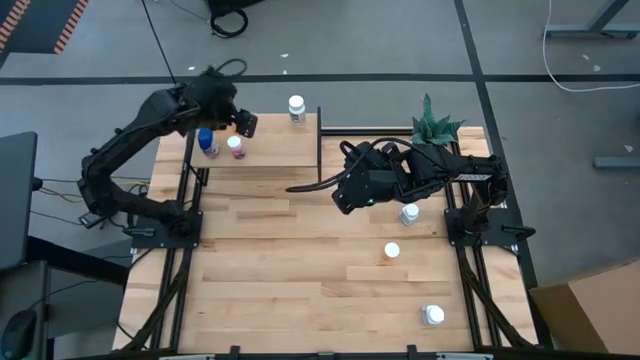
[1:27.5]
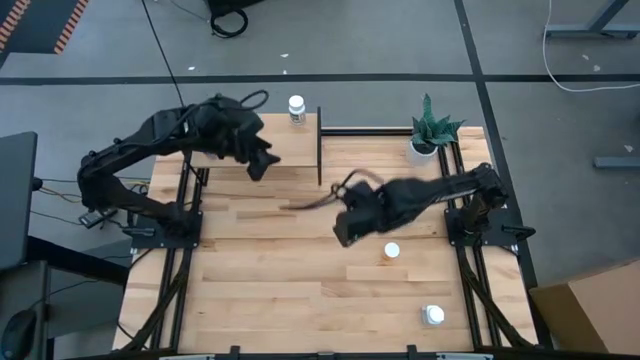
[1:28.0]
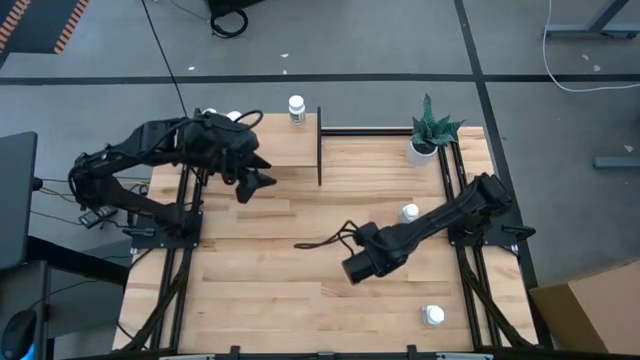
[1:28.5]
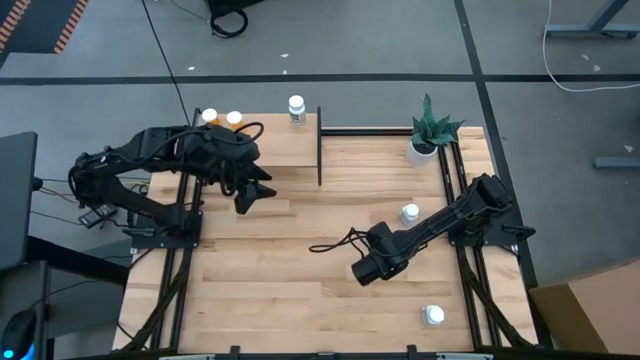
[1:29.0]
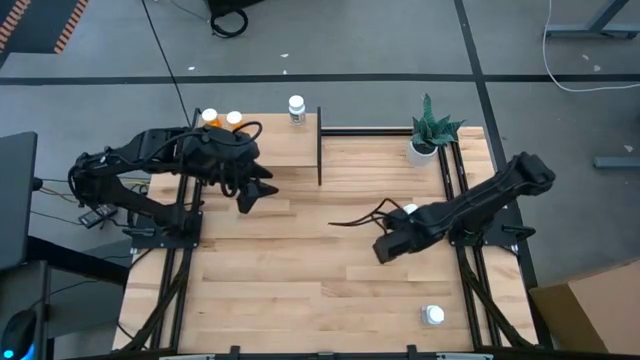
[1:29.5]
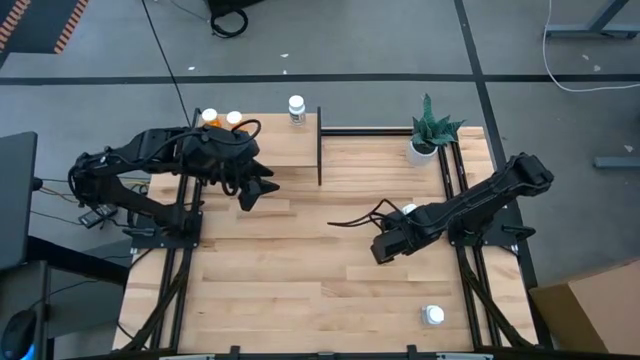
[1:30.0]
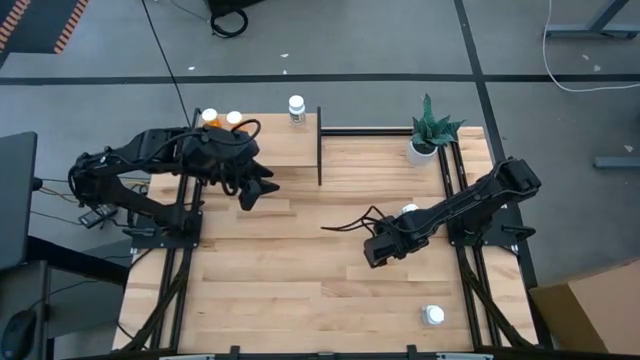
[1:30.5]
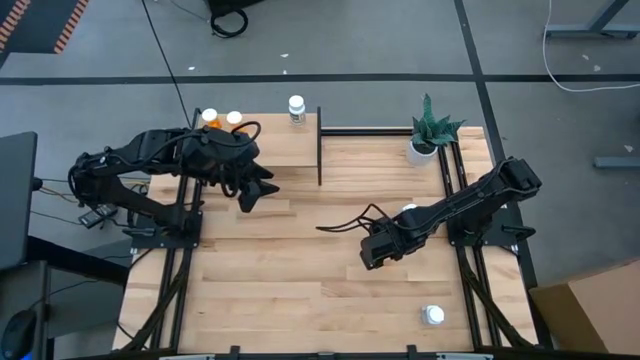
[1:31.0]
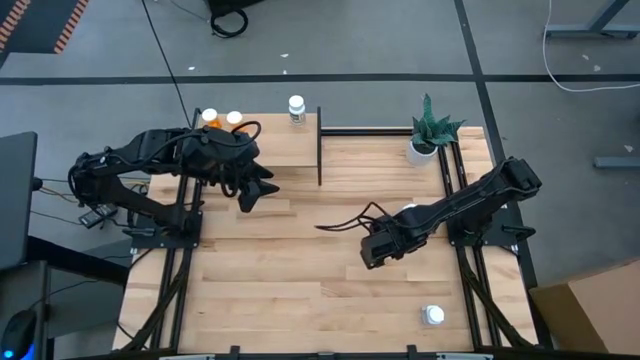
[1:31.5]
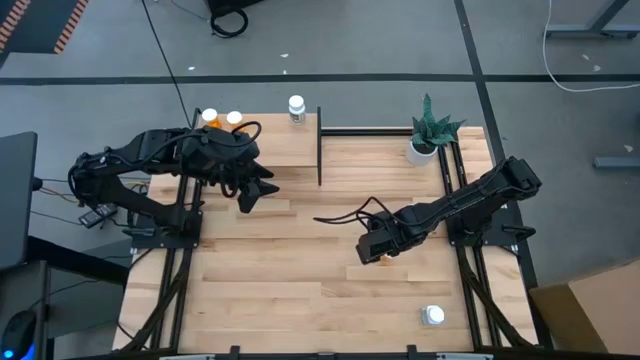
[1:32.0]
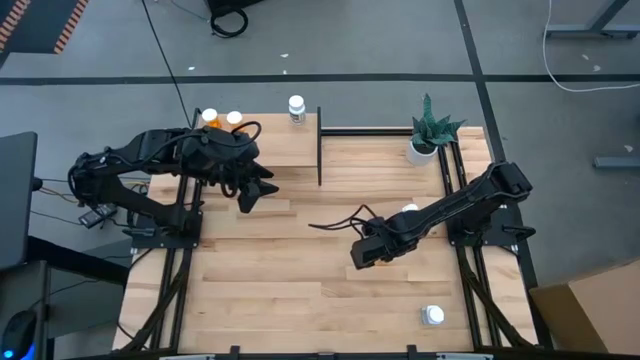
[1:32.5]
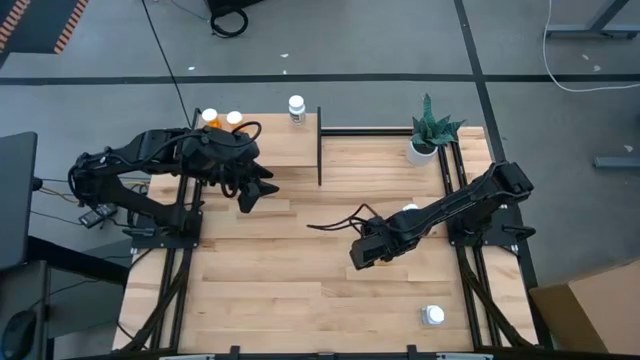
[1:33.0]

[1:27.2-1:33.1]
Task: Pick and place medicine bottles onto shelf by color
Put the orange pill bottle on the shelf

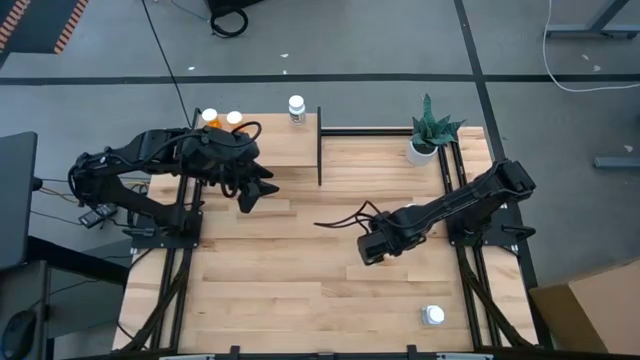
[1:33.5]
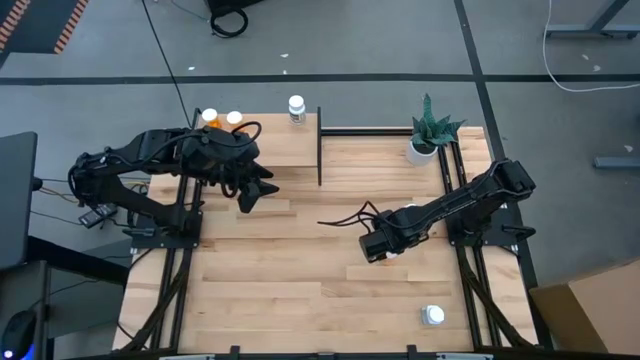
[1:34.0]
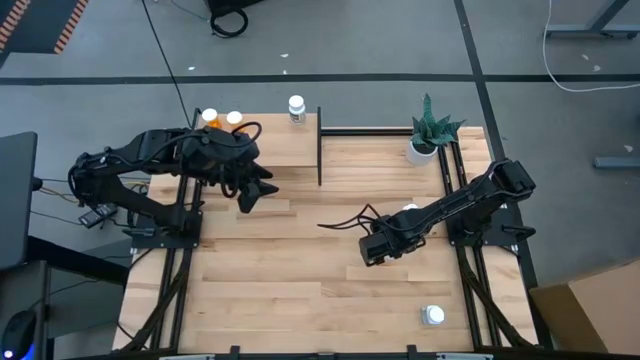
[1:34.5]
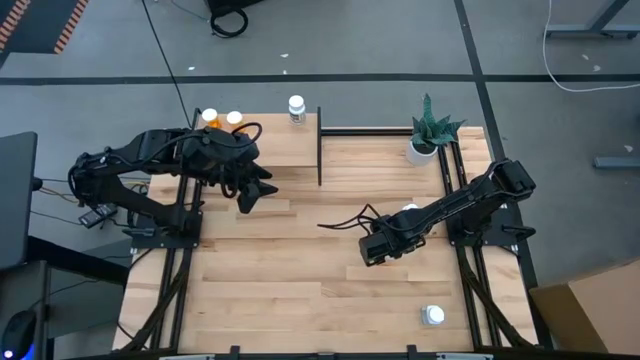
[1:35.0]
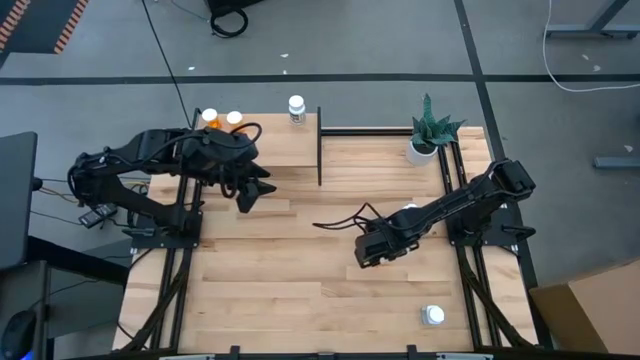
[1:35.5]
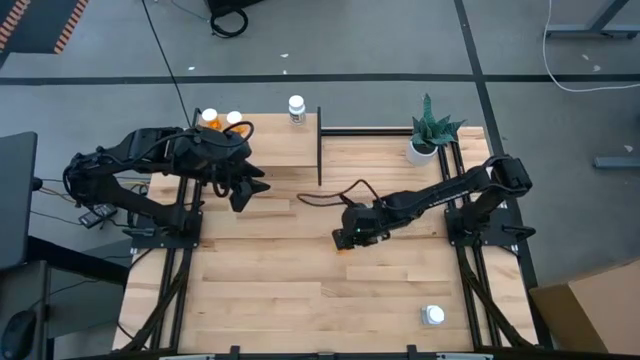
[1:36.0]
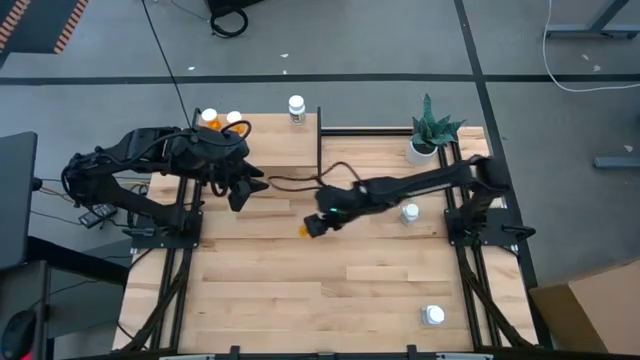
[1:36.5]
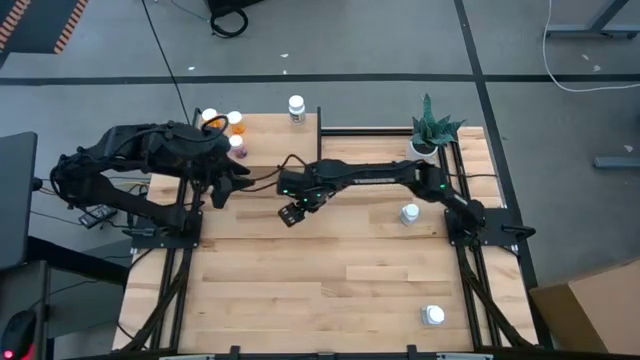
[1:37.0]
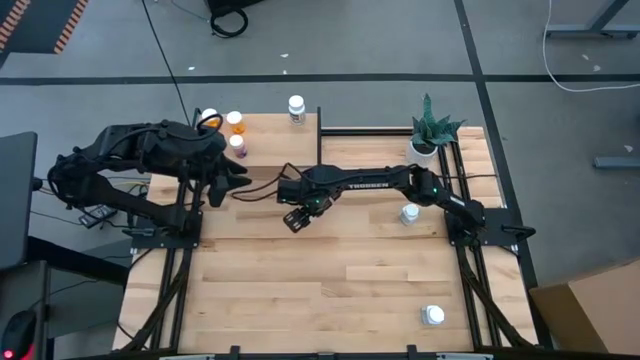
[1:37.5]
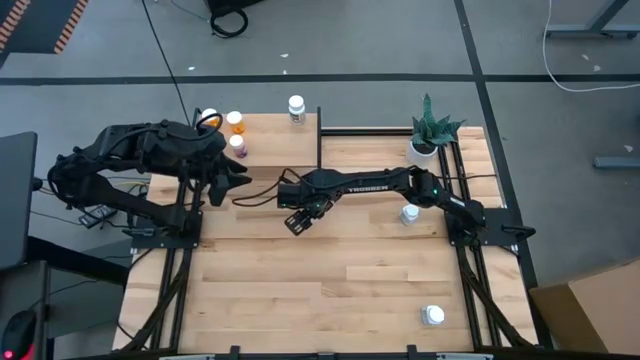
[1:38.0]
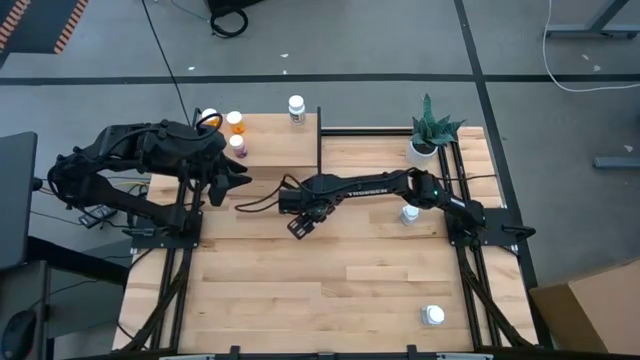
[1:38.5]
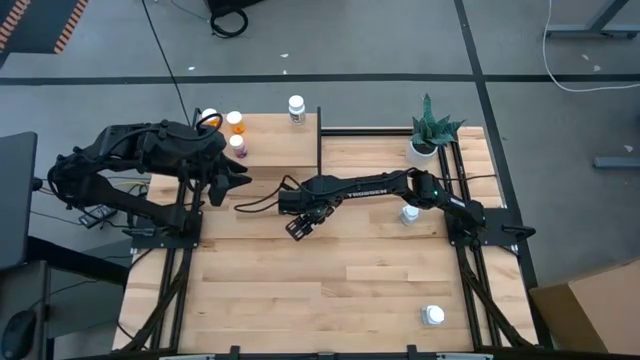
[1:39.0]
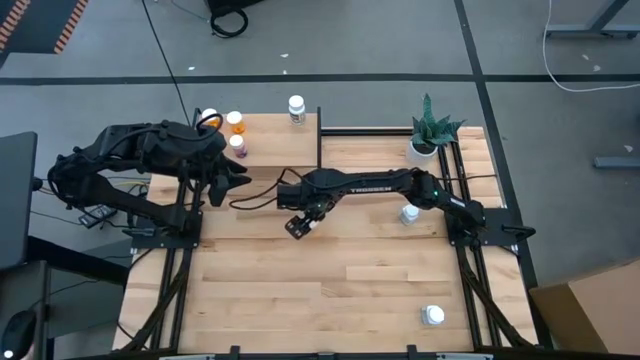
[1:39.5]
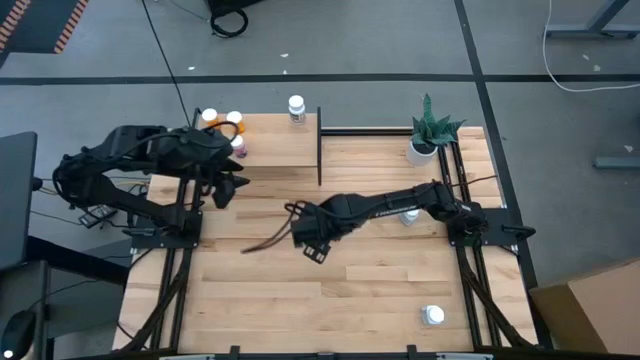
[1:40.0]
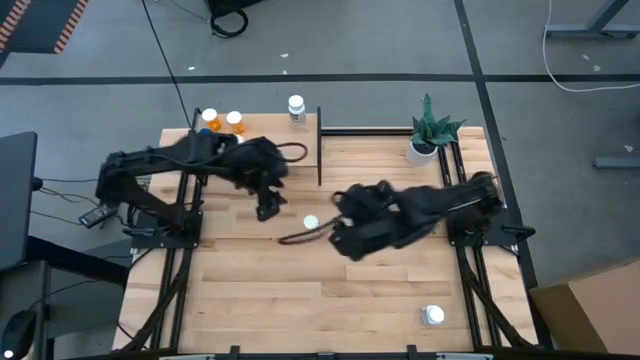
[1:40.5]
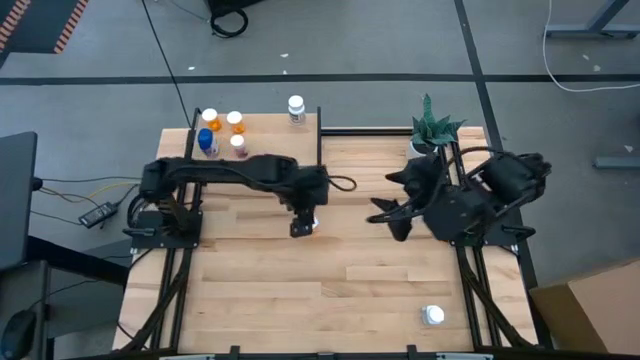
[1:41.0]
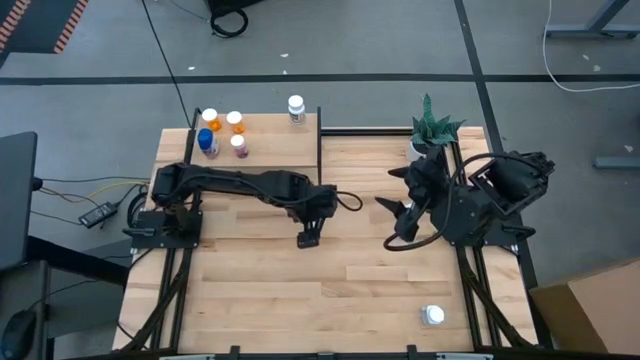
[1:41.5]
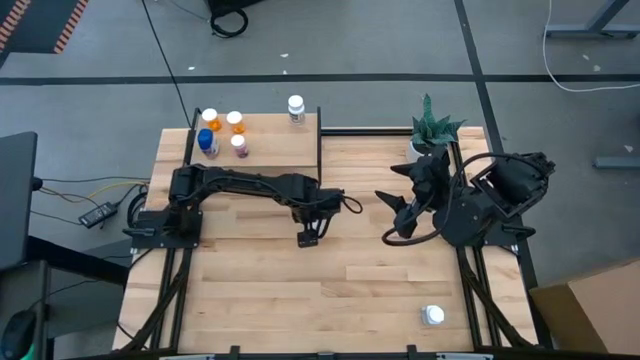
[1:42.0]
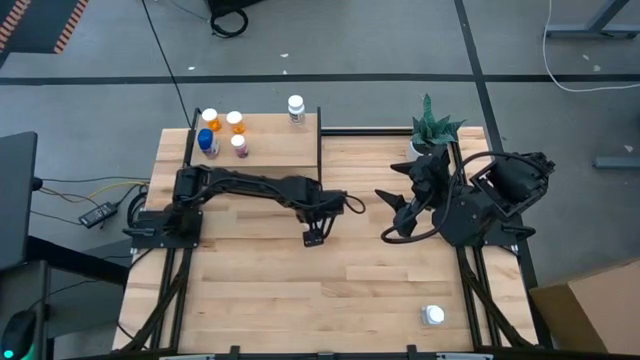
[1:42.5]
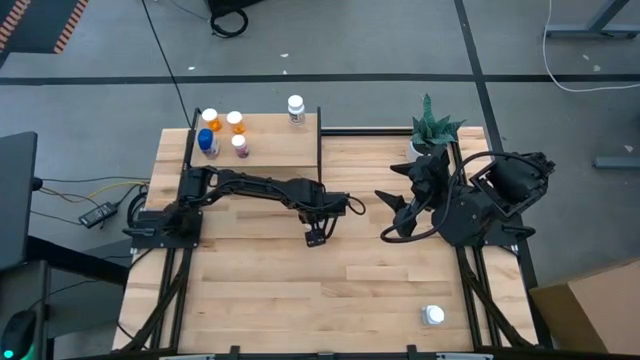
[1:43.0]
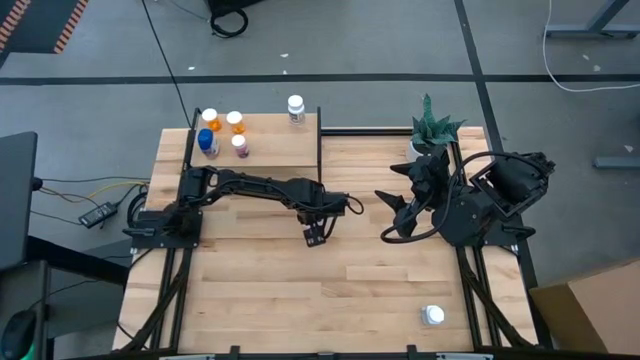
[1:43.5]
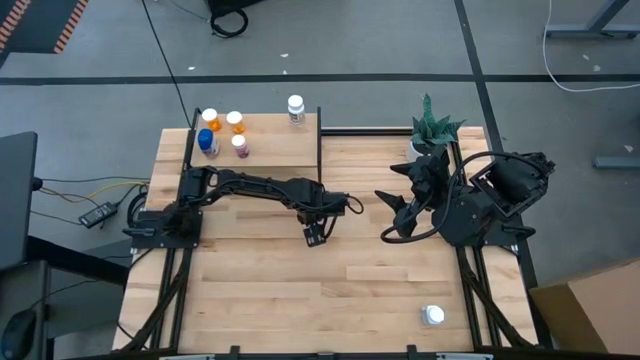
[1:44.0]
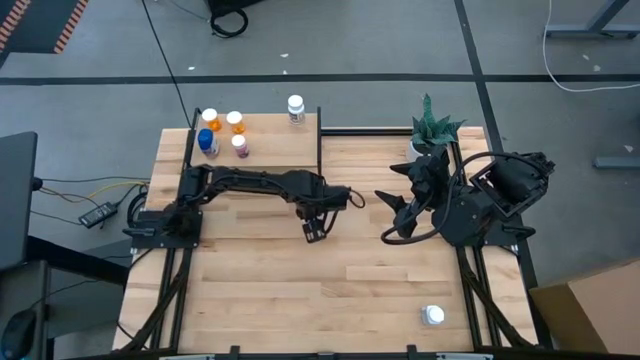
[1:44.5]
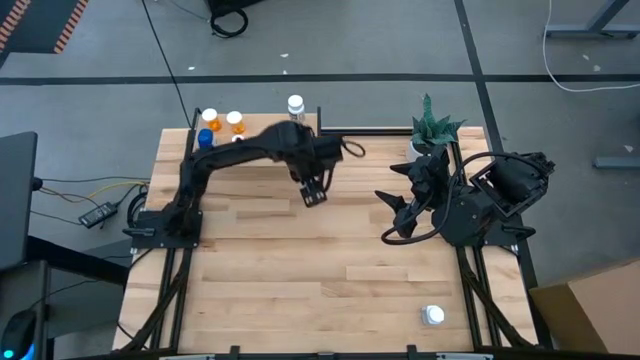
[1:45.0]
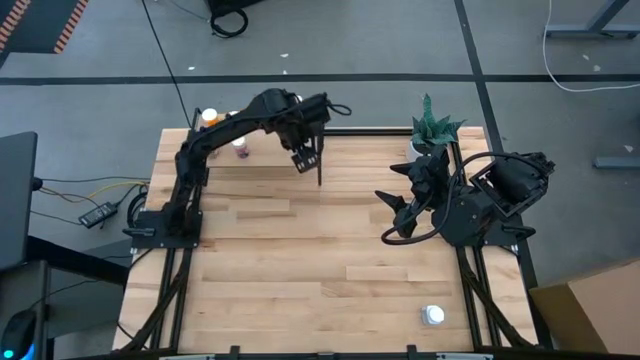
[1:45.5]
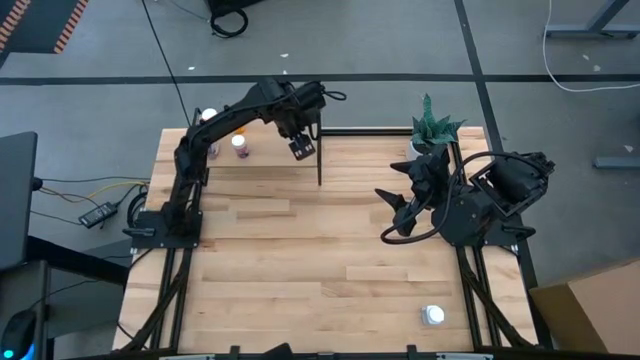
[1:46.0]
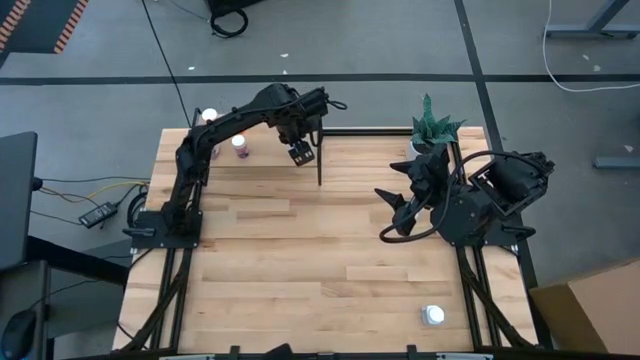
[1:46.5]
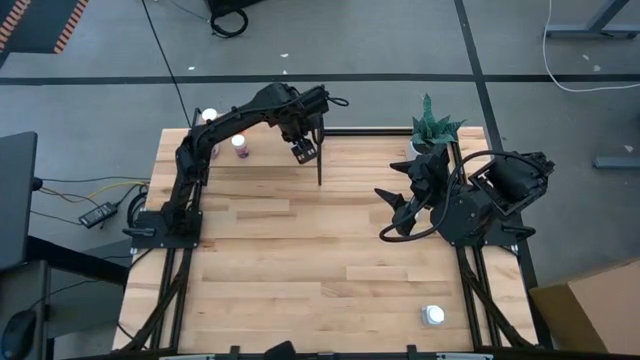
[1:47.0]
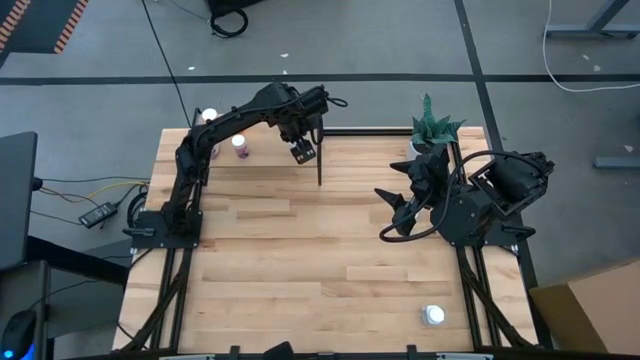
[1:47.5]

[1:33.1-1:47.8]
Put the orange pill bottle on the shelf
